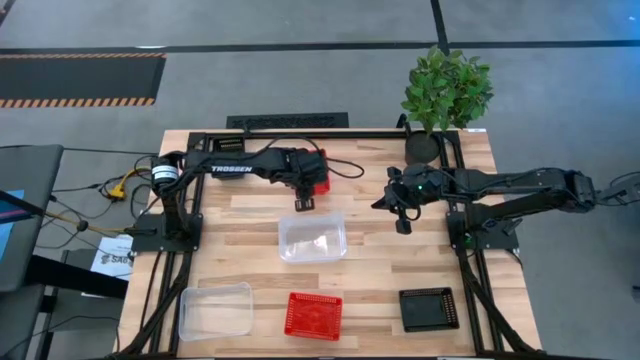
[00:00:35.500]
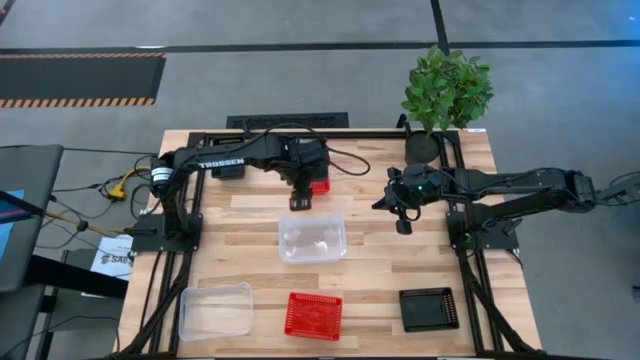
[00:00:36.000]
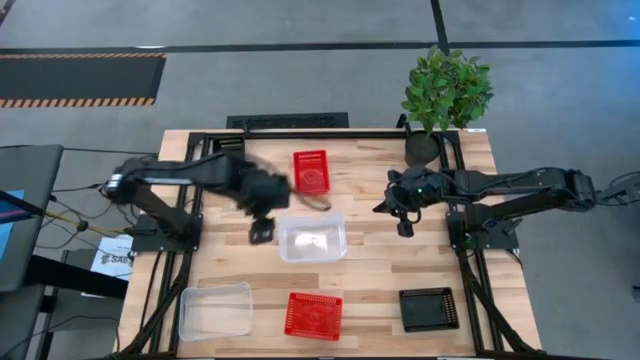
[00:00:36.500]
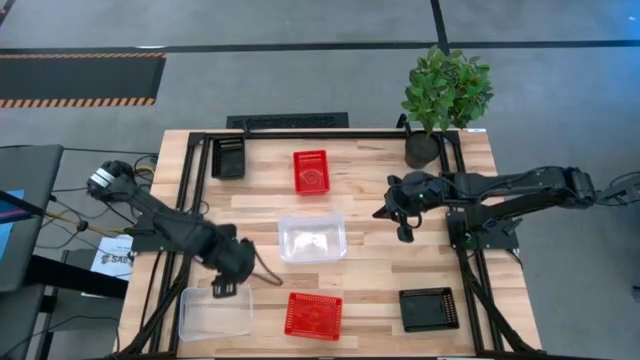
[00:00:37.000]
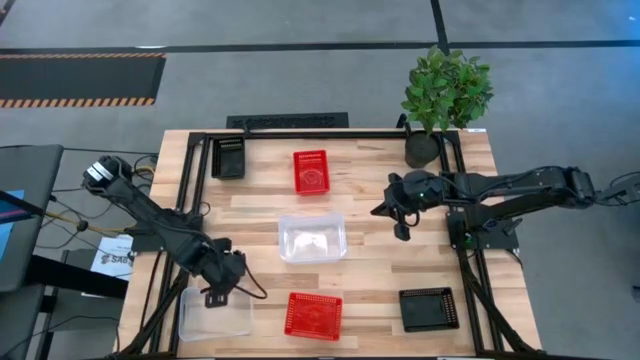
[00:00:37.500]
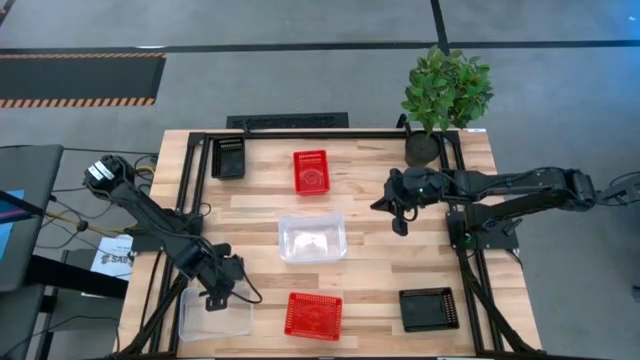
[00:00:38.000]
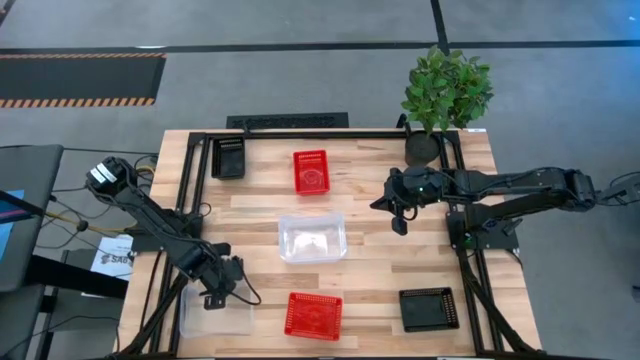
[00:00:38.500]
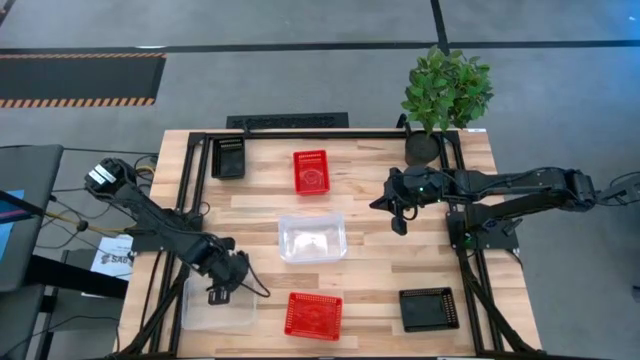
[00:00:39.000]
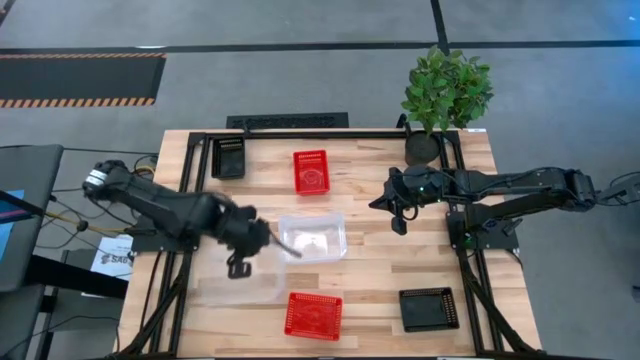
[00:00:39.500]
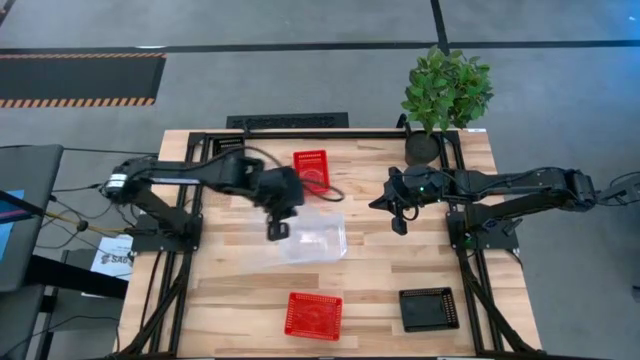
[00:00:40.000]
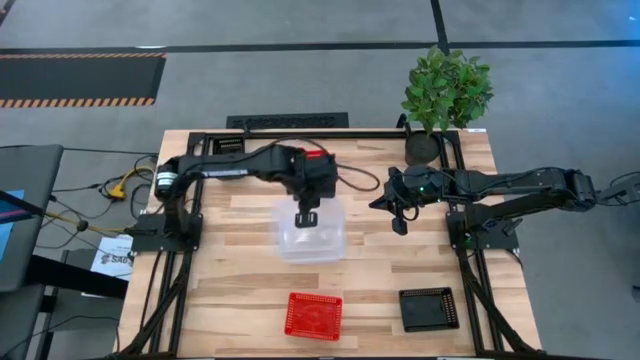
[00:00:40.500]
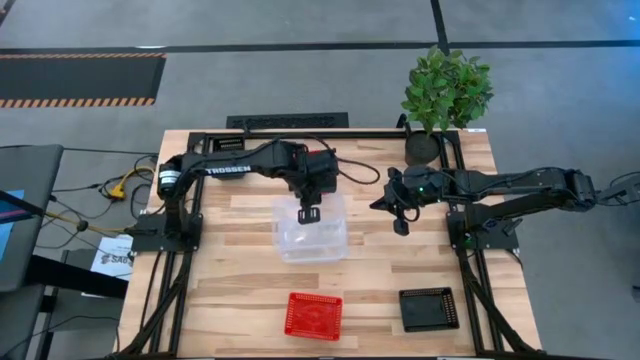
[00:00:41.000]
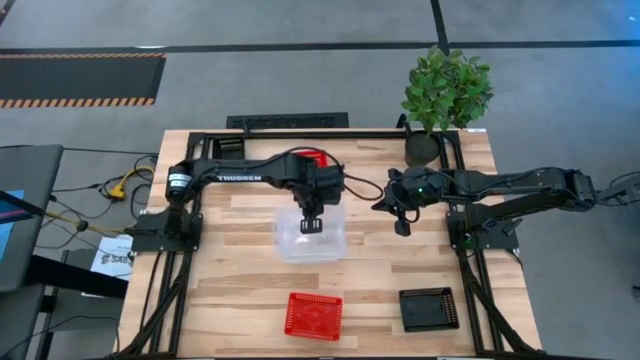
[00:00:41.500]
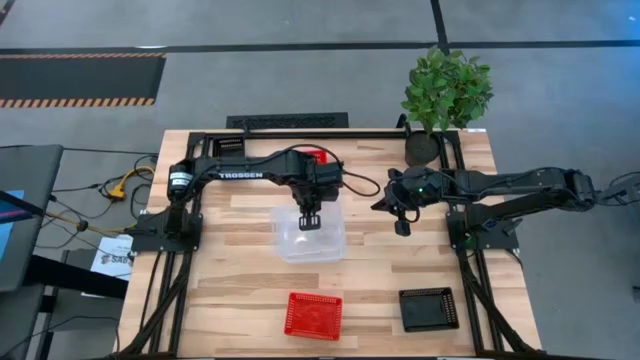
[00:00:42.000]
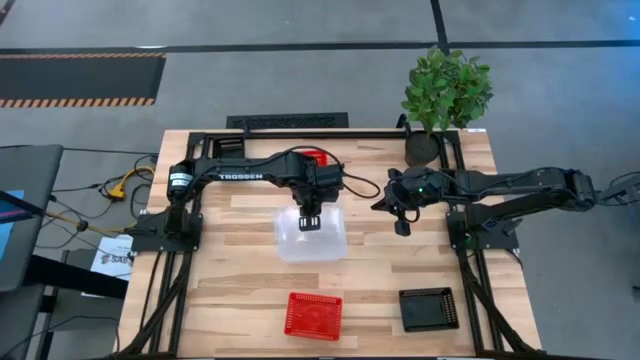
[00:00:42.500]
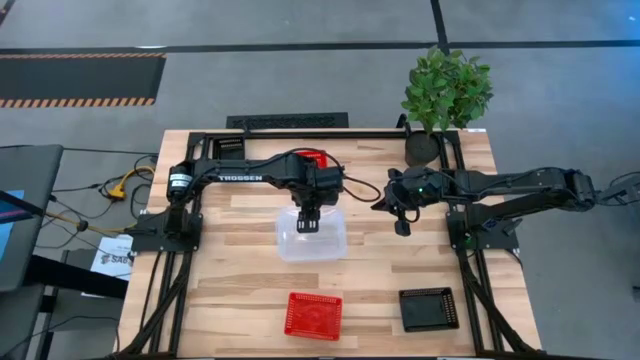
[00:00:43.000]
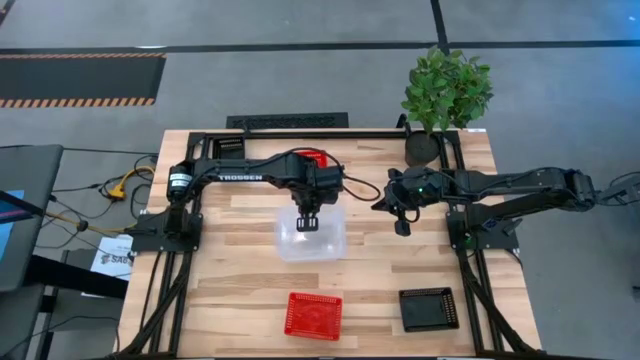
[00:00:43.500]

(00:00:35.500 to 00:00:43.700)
Stack the bottom transparent bin on top of the top transparent bins

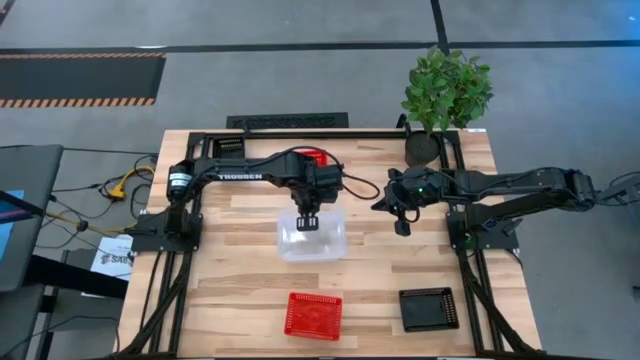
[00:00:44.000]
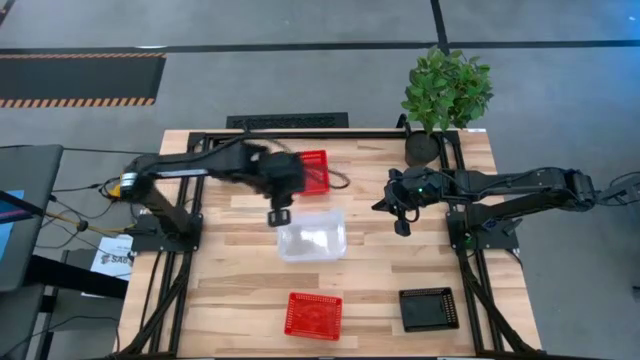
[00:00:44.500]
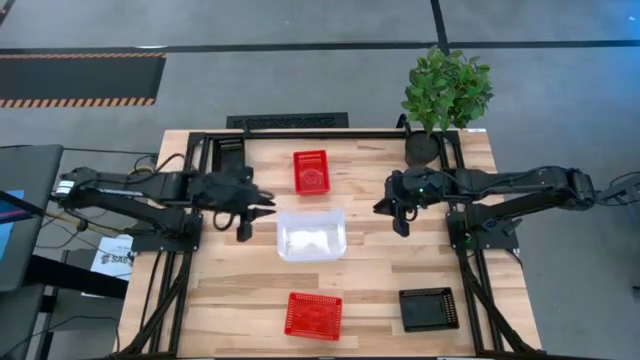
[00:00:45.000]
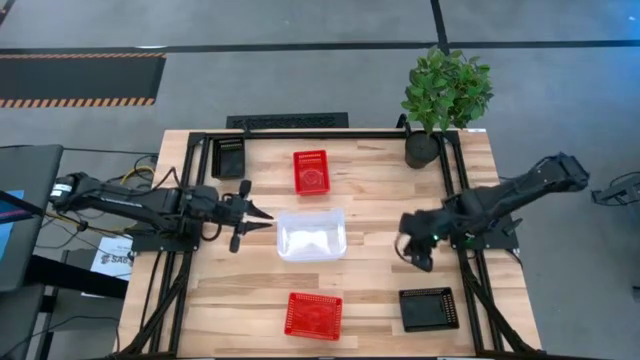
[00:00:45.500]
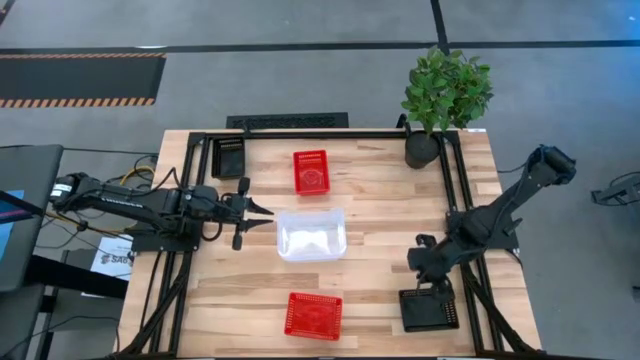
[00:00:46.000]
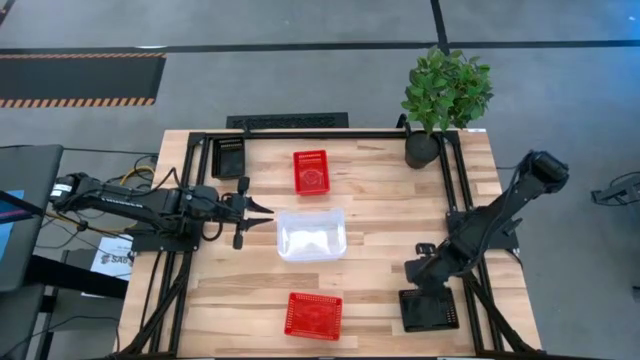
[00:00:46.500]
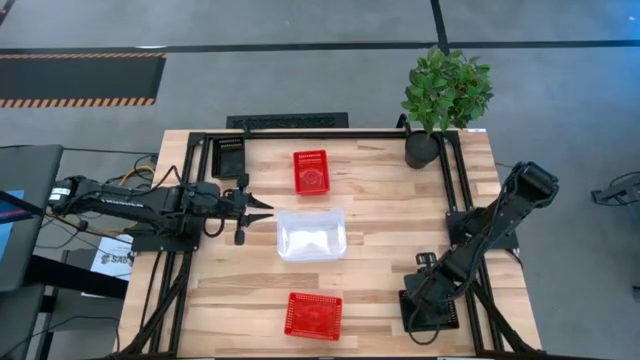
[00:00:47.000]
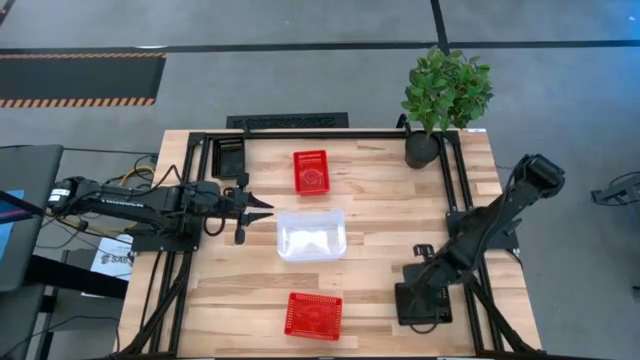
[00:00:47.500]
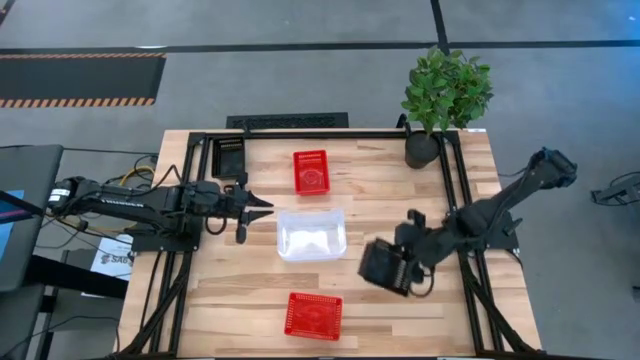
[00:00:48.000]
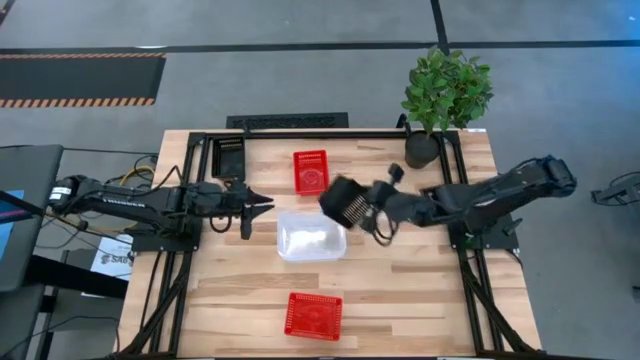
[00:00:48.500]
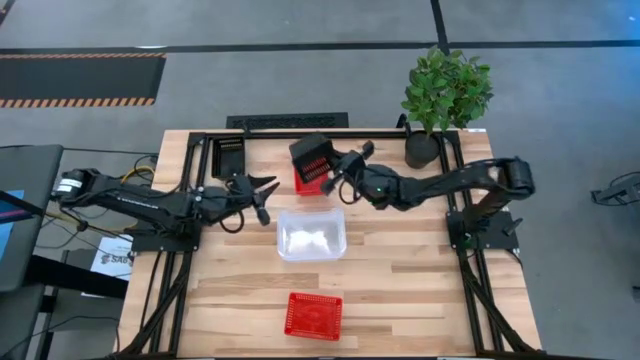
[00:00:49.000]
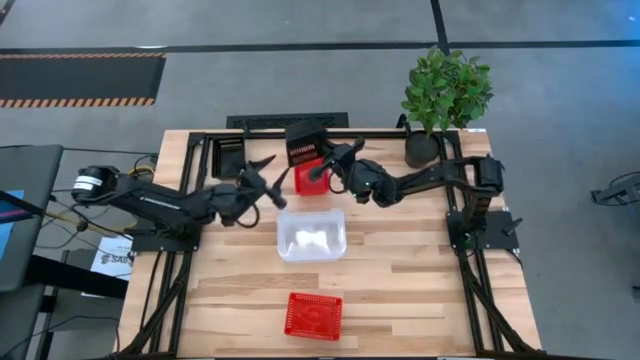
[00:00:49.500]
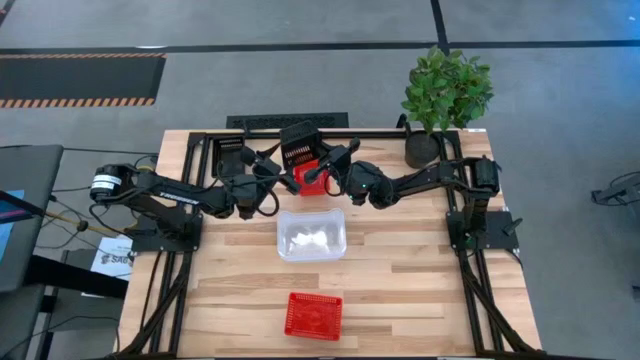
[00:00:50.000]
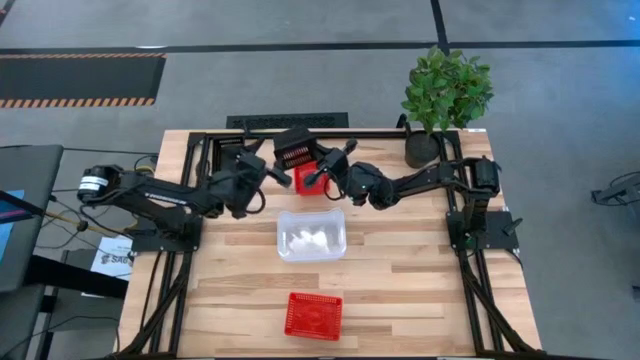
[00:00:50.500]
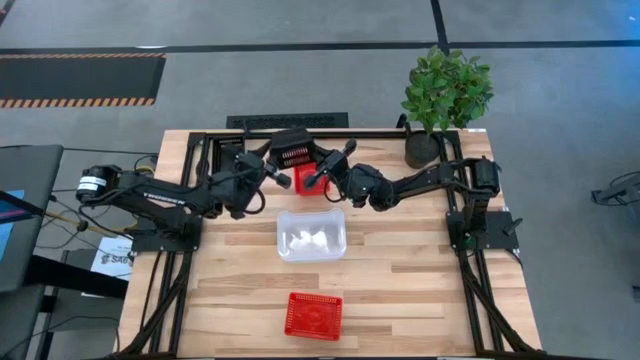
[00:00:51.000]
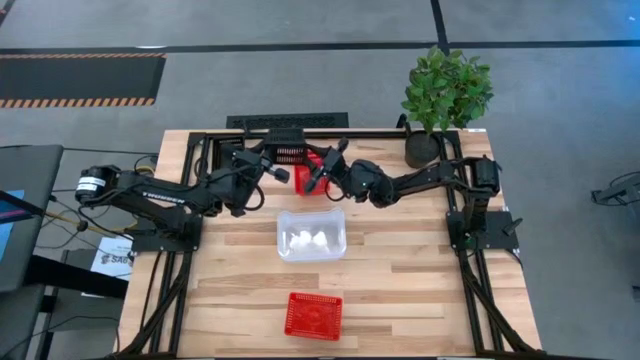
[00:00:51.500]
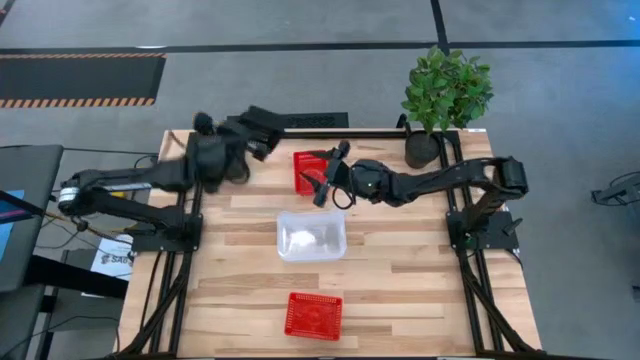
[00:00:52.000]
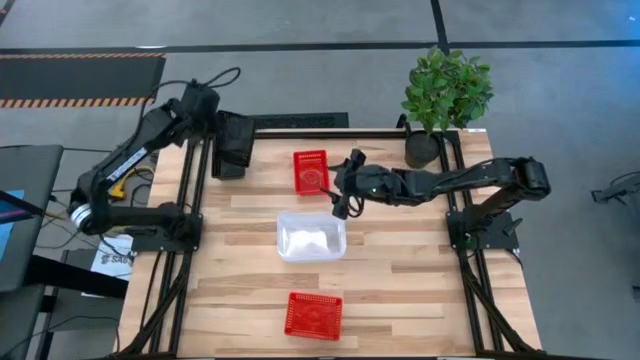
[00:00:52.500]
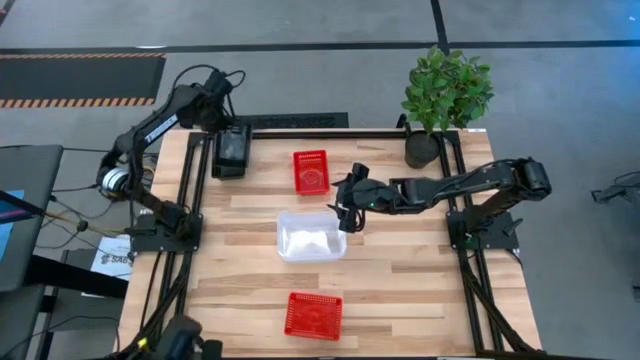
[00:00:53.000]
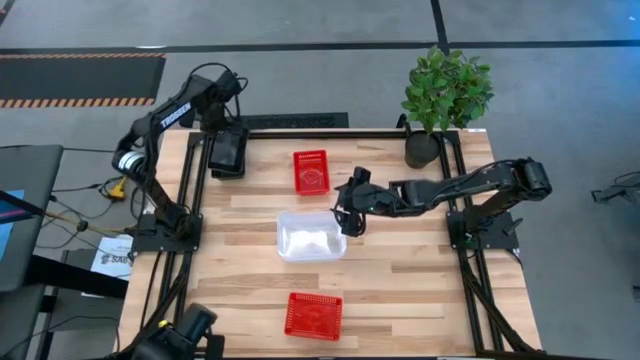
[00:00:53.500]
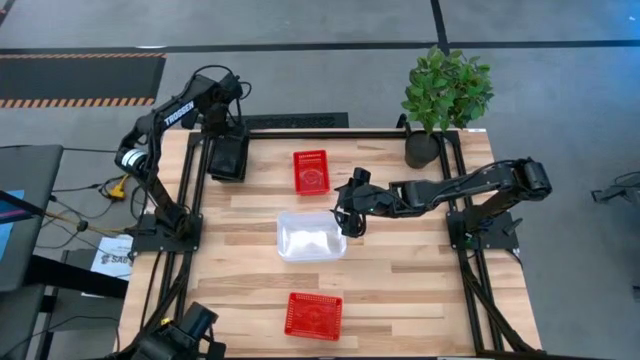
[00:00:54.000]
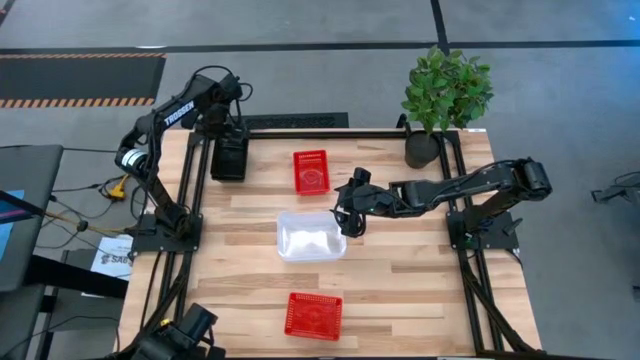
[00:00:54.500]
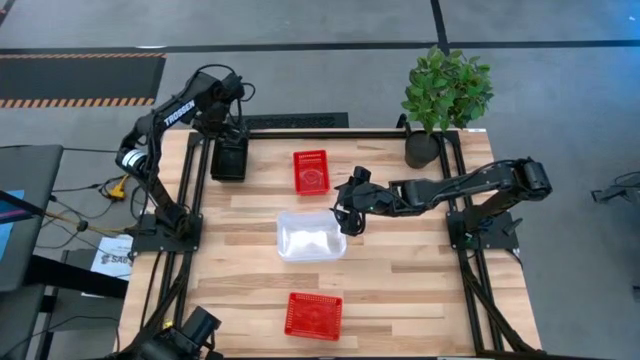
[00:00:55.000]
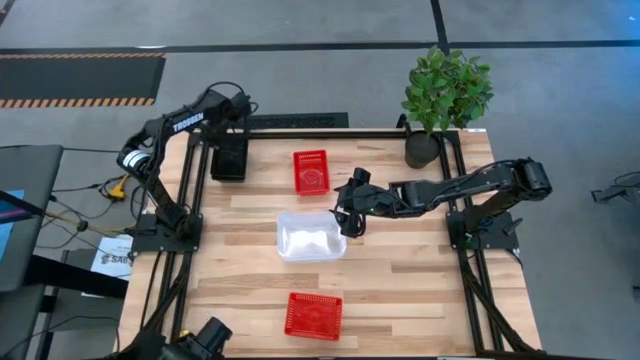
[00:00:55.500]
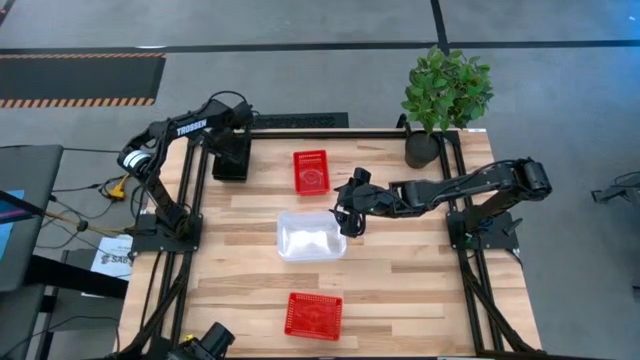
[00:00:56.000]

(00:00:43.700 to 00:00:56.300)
Stack the bottom black bin on top of the top black bins
